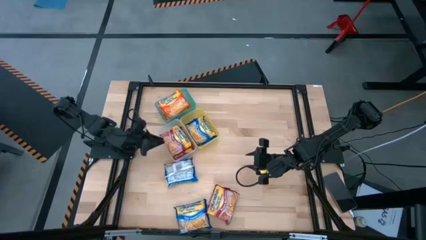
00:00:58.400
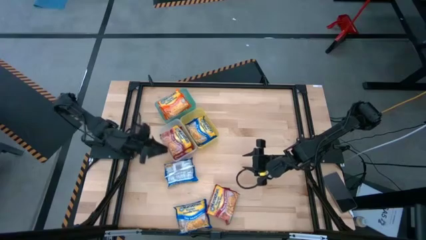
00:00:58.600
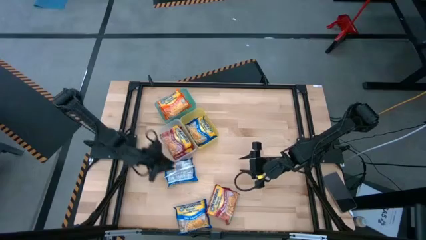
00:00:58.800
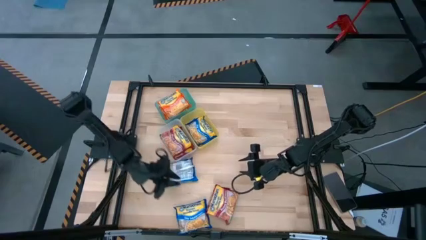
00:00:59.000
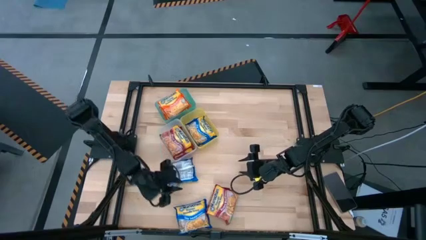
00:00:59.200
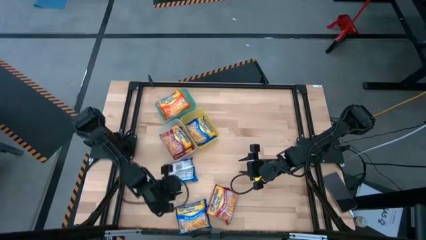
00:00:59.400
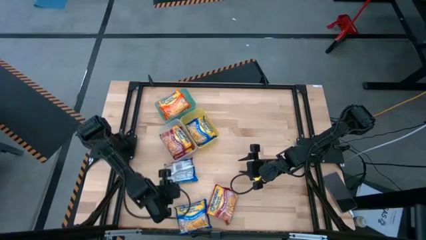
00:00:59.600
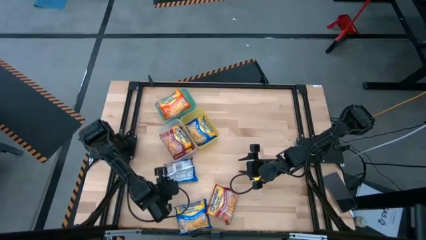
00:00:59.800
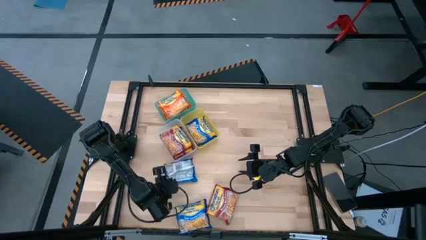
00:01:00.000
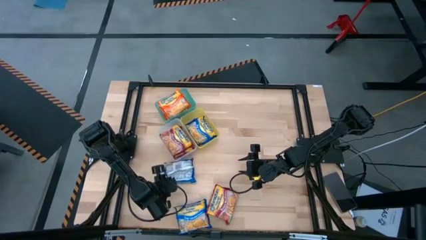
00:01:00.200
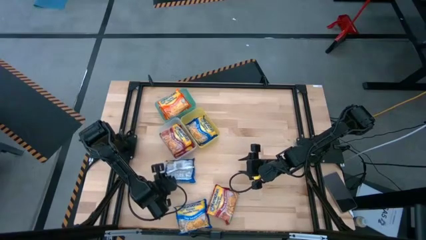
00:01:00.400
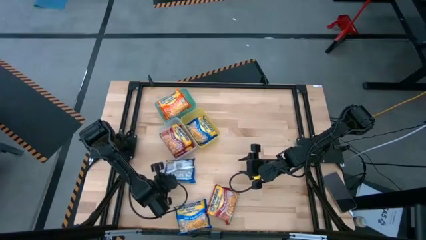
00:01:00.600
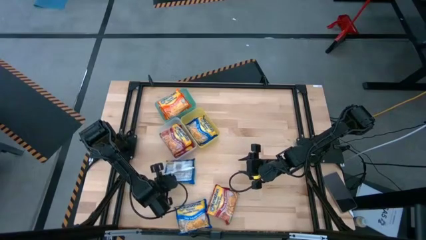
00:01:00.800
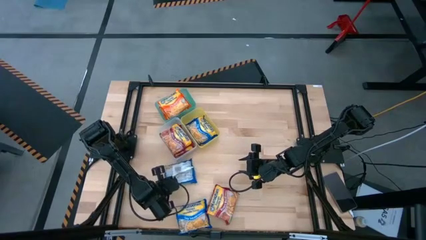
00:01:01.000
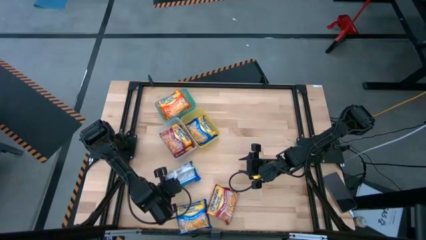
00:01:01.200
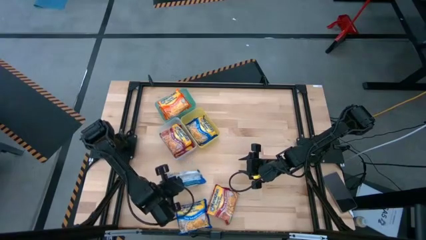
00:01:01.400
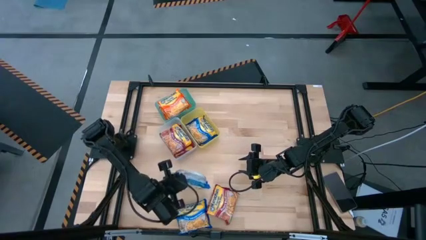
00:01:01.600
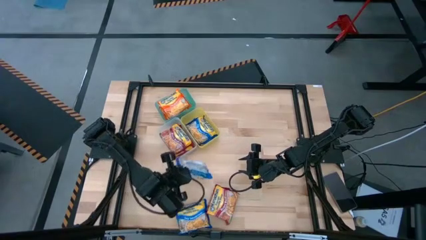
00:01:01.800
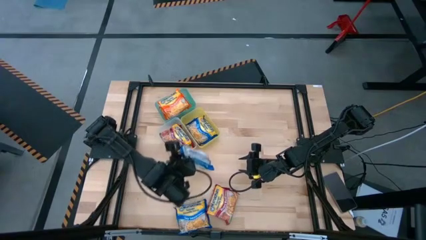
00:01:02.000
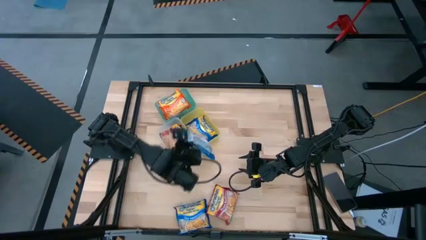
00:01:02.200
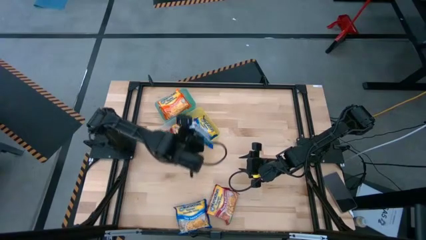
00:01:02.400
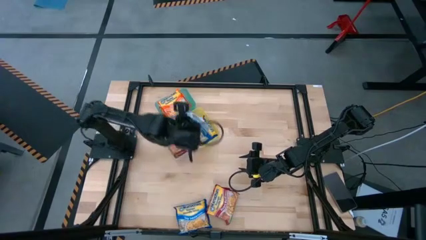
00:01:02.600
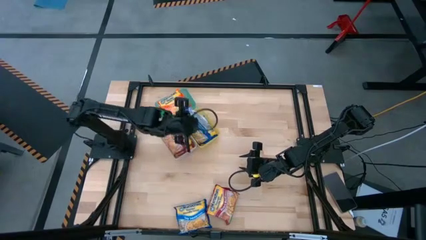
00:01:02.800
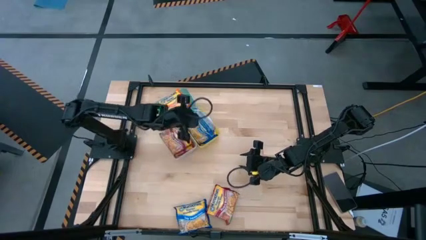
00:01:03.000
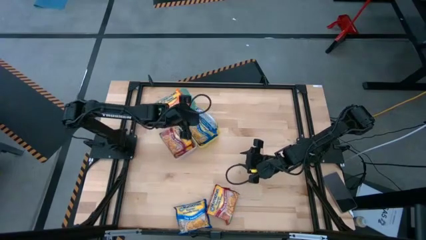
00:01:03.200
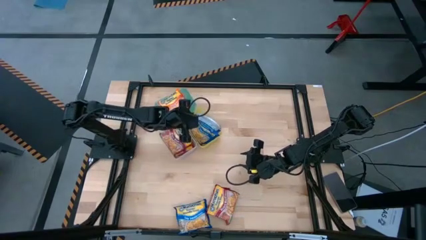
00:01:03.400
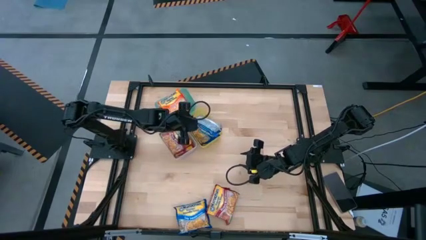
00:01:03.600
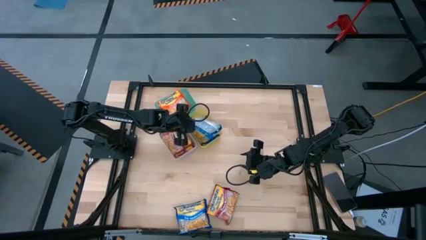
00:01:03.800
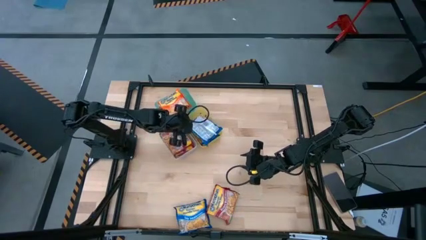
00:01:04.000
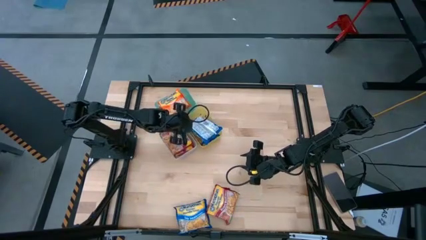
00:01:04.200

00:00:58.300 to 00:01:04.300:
Task: Sort Maruchan noodles
Put the top blue noodle pack into the yellow bin

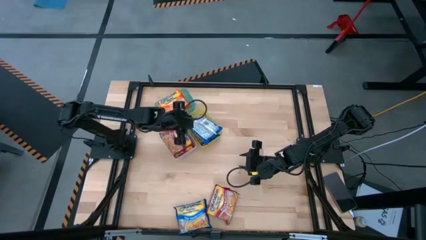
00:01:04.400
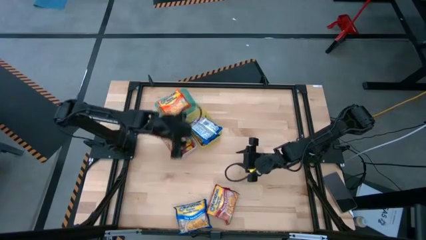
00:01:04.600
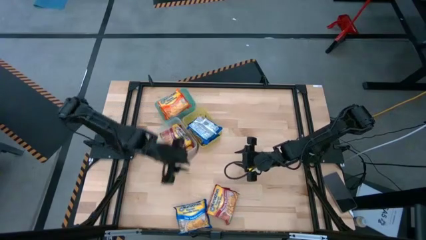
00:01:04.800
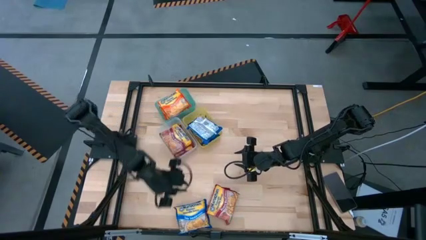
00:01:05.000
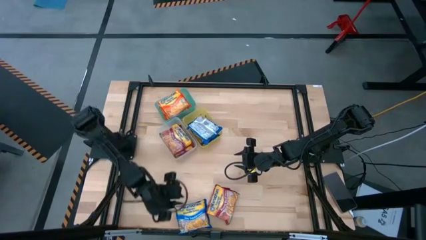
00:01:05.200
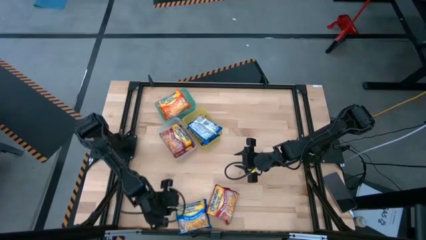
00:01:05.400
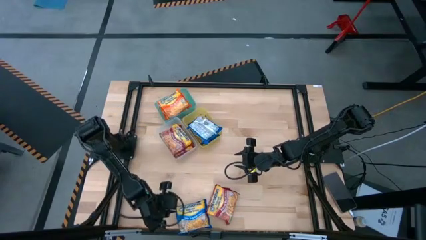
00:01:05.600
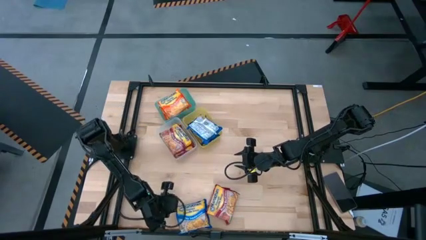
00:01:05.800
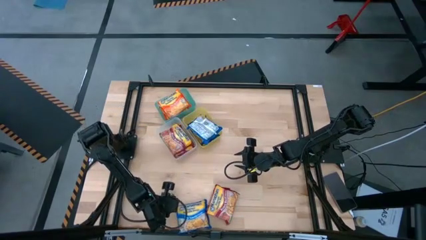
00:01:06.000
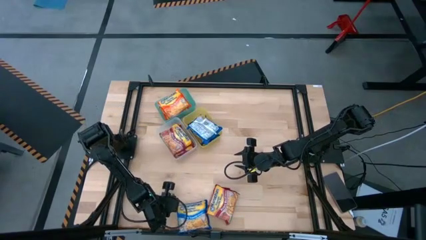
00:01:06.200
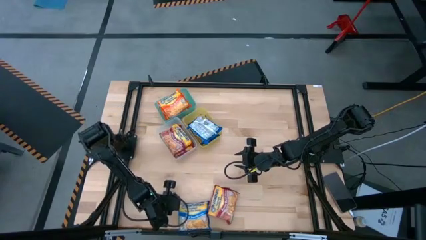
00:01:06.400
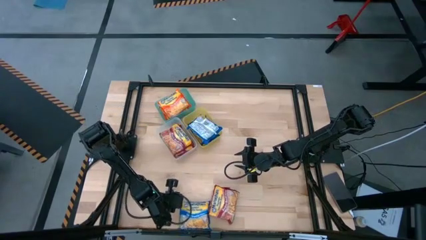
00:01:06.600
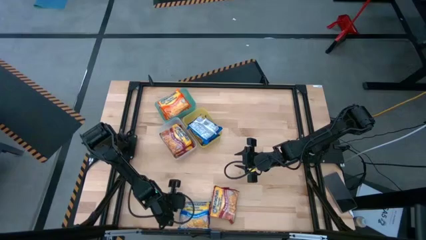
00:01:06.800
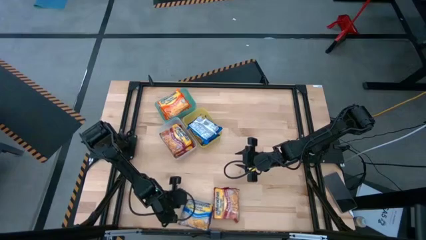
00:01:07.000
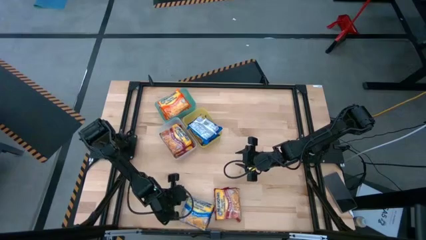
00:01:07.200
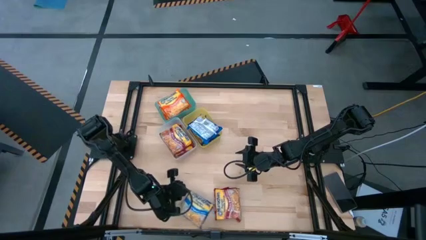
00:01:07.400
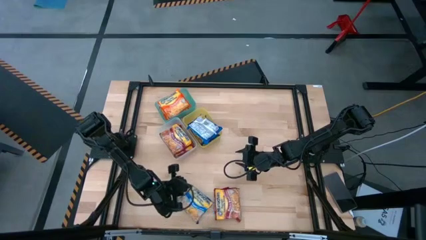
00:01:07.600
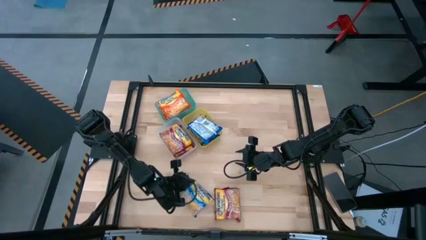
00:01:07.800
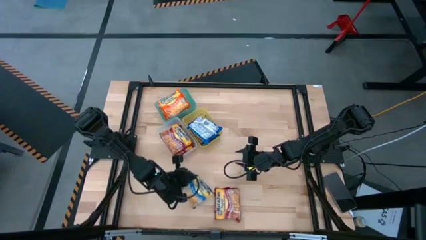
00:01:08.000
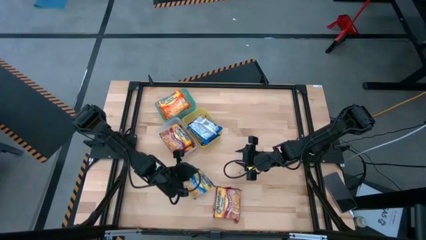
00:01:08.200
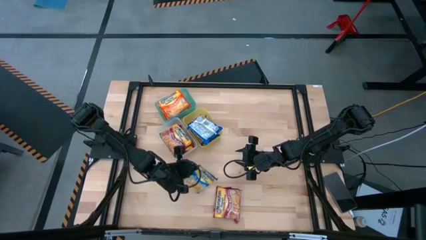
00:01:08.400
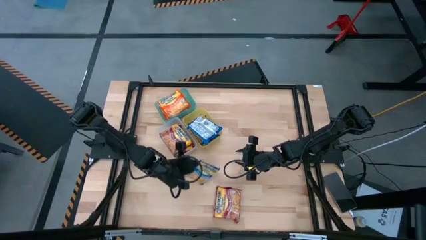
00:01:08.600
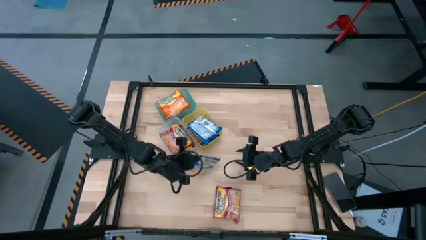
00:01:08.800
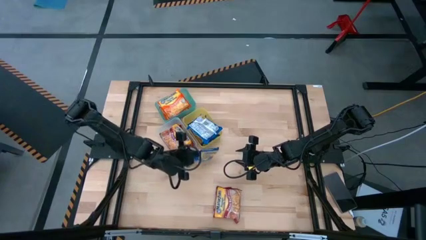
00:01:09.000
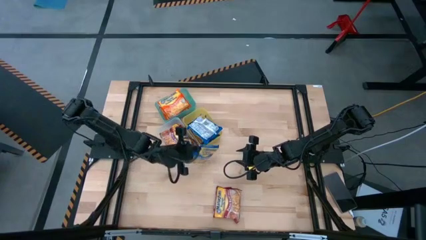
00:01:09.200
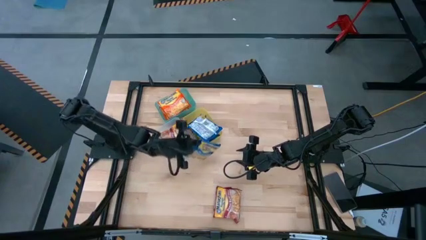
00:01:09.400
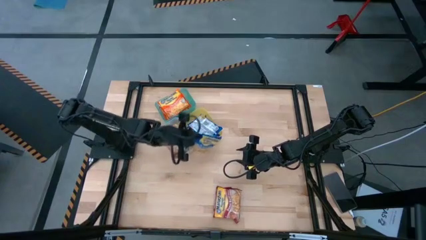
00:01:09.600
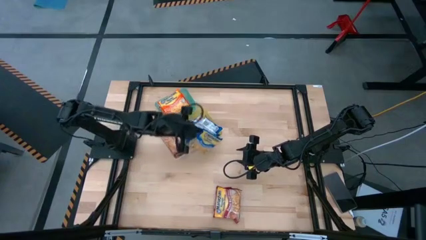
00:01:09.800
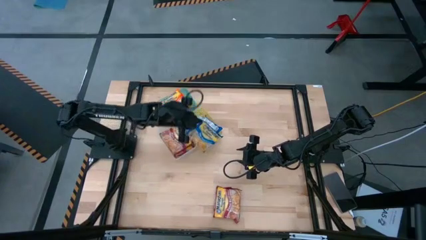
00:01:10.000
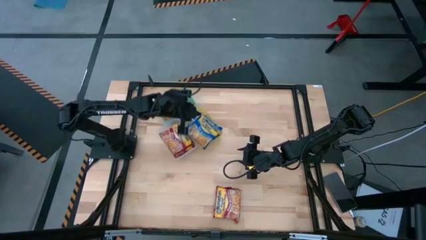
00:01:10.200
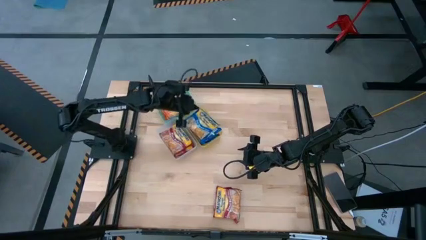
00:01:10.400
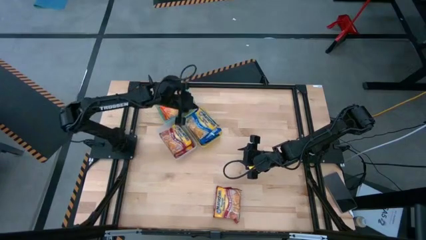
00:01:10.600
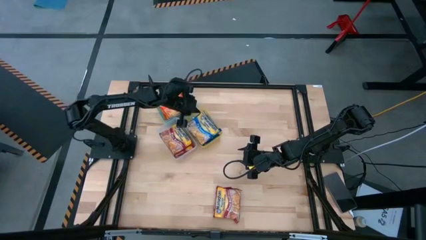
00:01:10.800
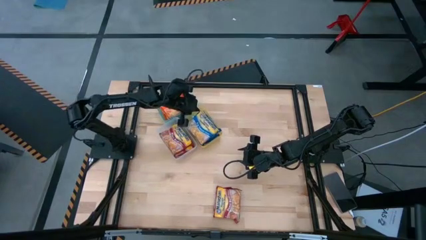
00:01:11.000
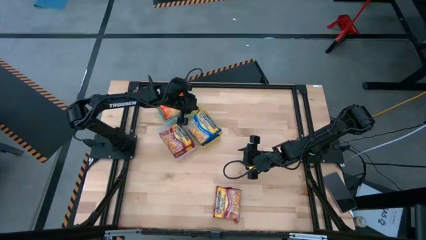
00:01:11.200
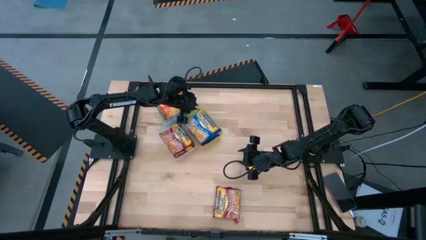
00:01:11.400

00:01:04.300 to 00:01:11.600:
Put the bottom blue noodle pack into the yellow bin

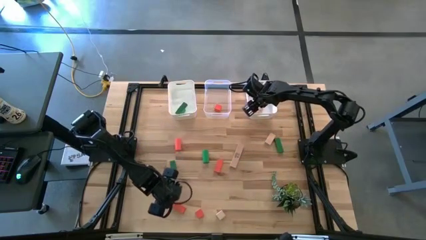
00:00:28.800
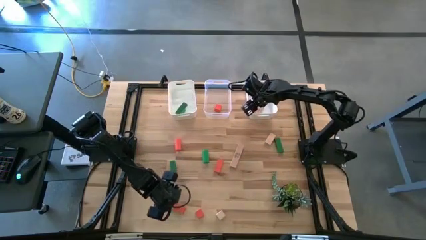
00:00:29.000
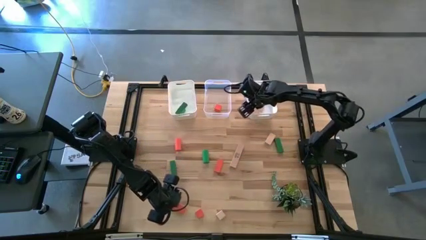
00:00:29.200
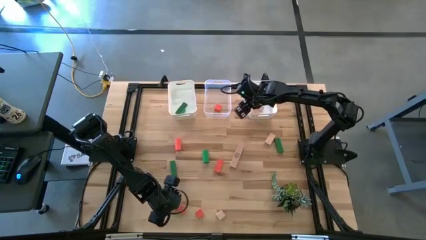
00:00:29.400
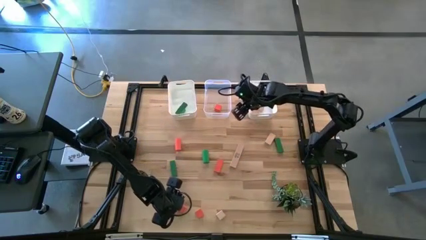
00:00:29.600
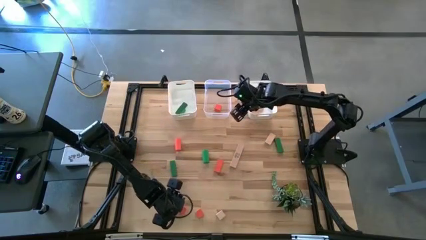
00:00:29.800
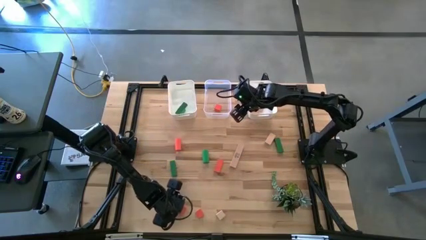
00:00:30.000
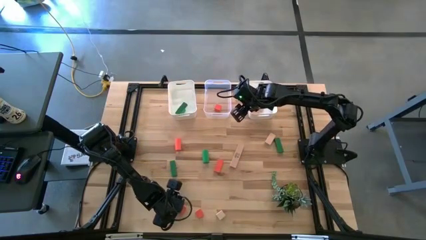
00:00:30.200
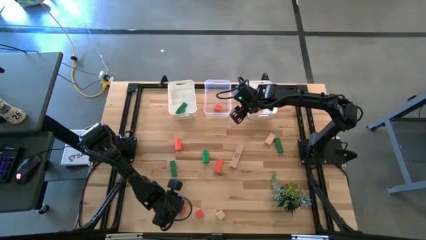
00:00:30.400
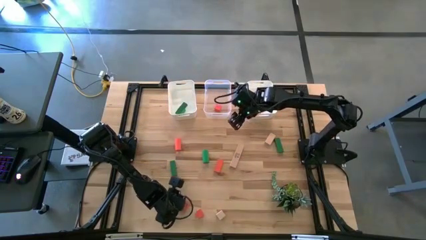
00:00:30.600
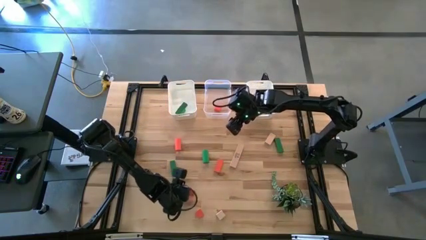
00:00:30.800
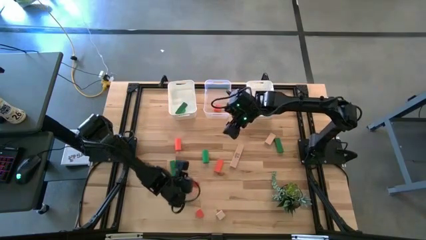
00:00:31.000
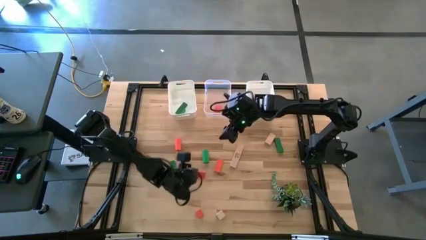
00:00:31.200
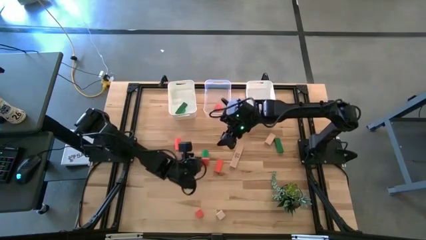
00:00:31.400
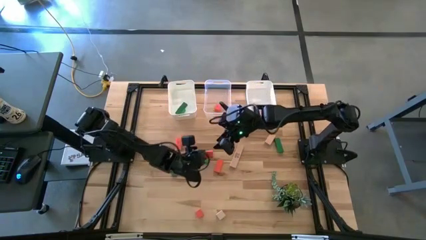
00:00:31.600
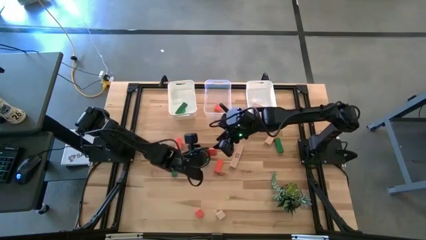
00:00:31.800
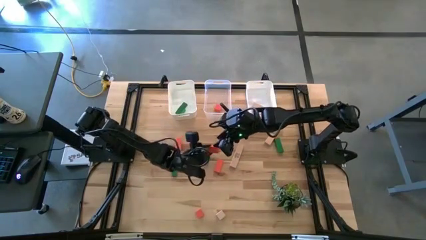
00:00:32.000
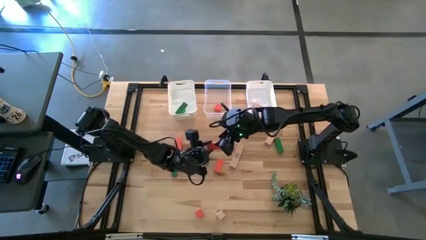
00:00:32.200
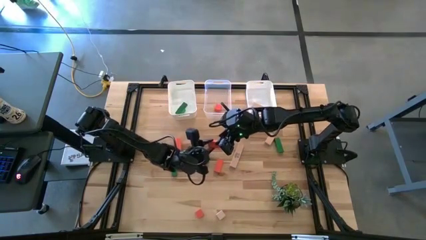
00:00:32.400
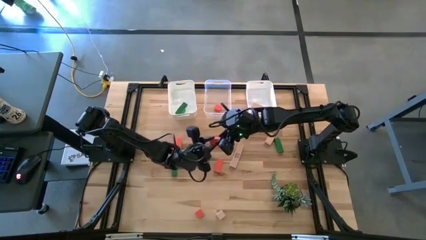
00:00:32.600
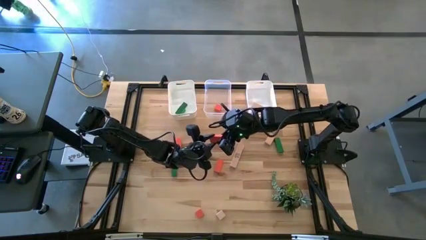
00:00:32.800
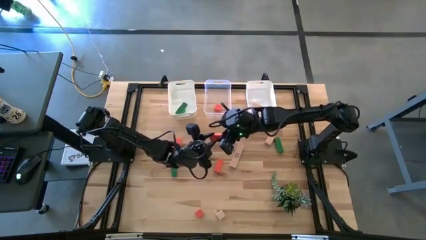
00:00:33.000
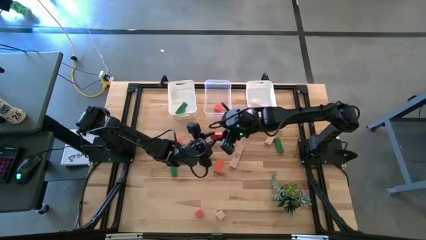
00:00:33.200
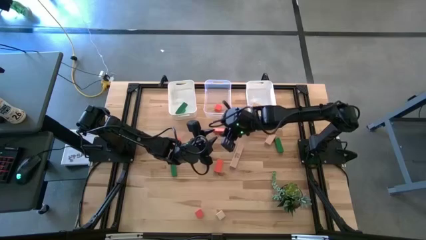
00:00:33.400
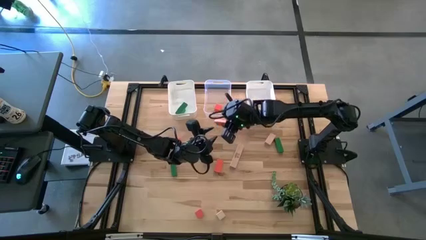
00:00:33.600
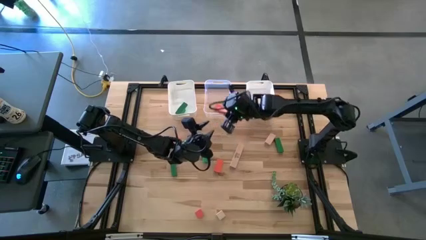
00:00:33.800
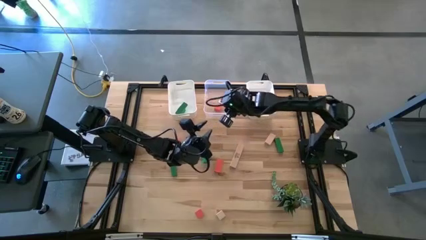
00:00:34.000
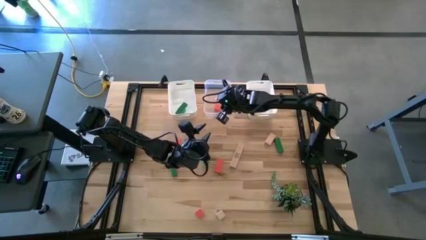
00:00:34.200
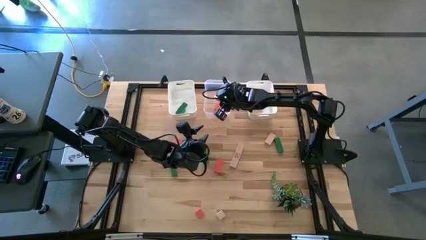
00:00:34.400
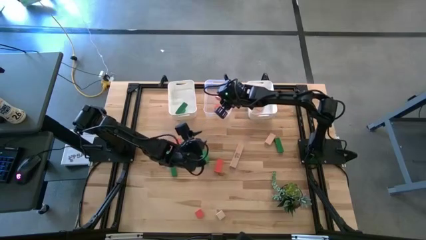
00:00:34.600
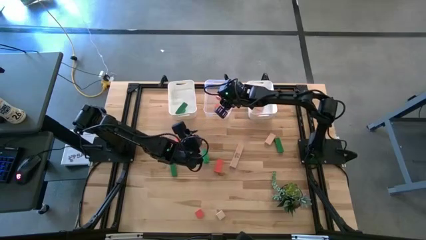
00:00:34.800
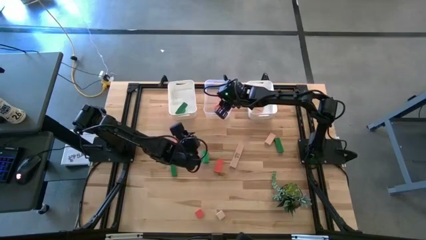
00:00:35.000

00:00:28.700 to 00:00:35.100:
Task: Sort & place blocks by color
Put the orange block into the transparent bin
